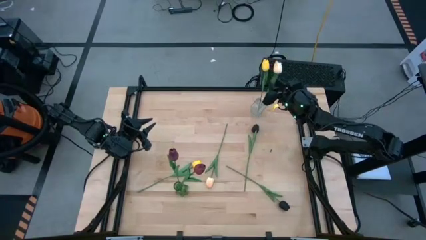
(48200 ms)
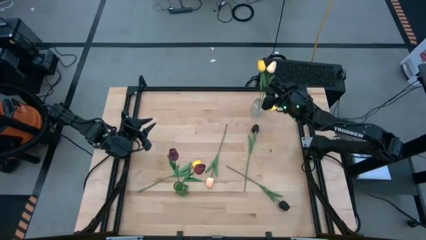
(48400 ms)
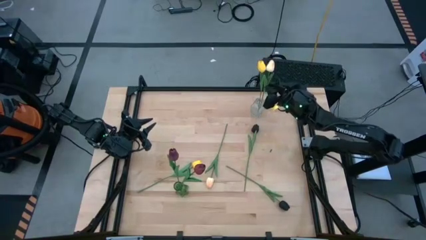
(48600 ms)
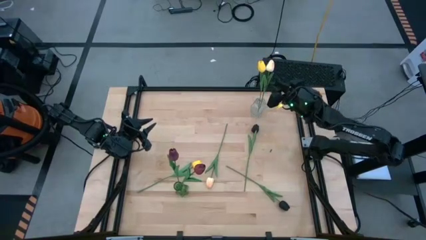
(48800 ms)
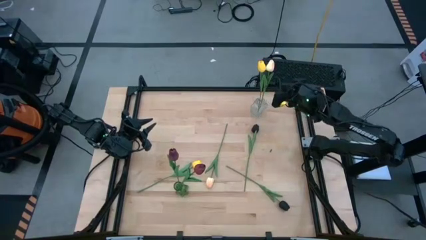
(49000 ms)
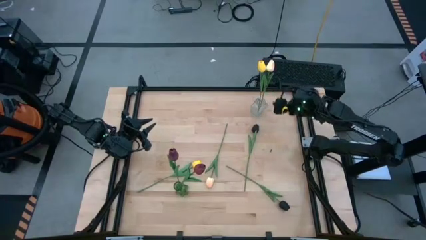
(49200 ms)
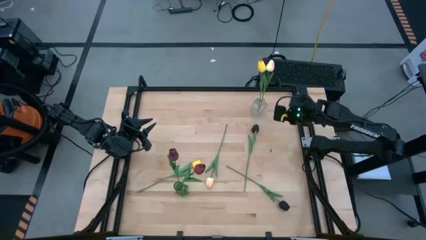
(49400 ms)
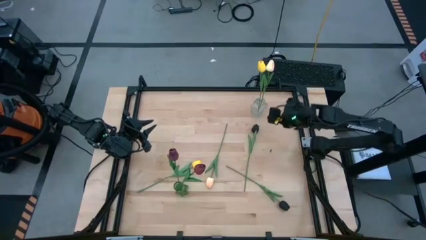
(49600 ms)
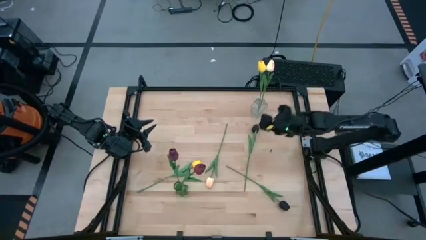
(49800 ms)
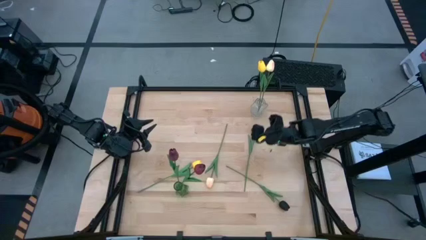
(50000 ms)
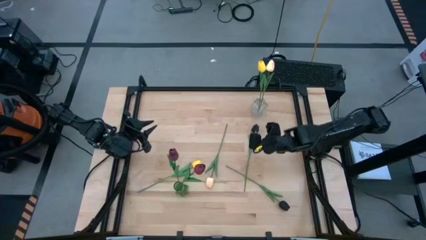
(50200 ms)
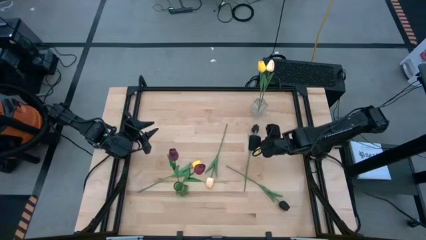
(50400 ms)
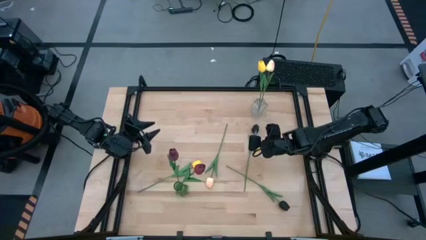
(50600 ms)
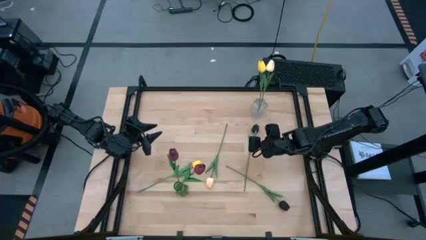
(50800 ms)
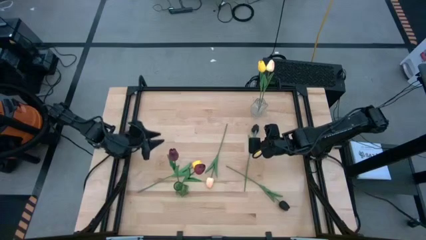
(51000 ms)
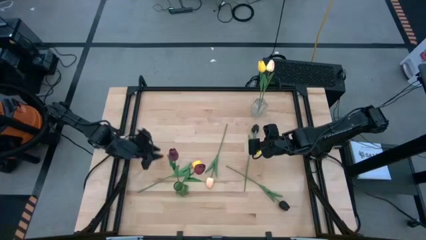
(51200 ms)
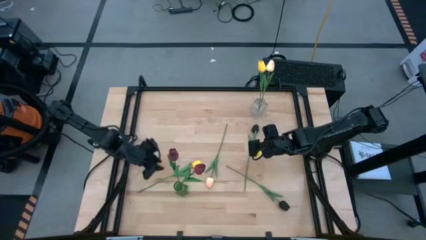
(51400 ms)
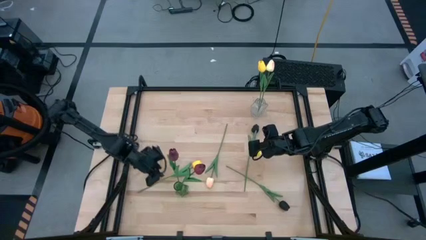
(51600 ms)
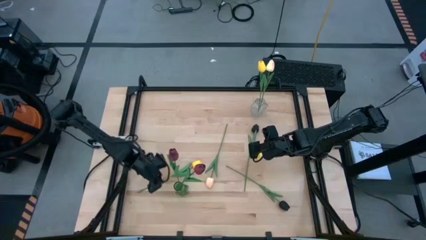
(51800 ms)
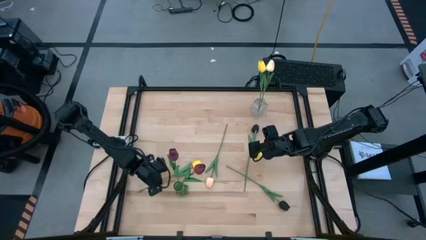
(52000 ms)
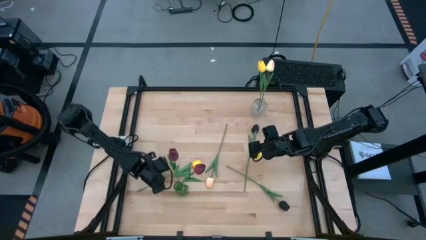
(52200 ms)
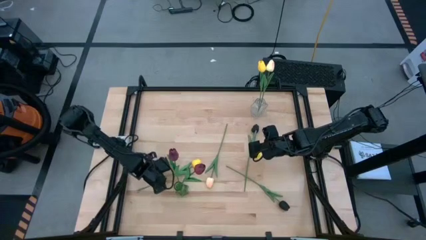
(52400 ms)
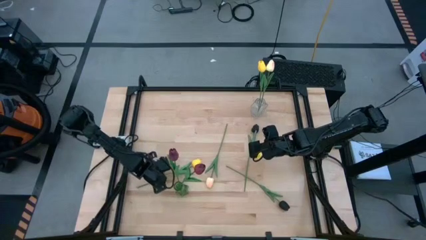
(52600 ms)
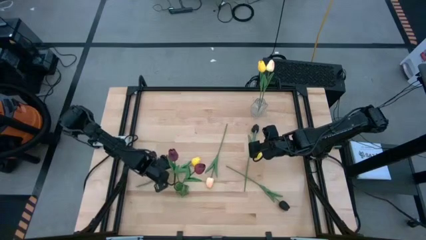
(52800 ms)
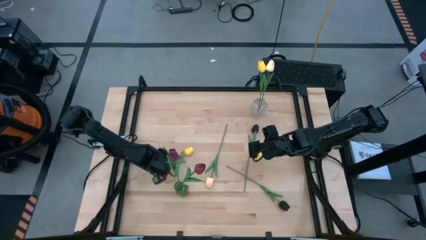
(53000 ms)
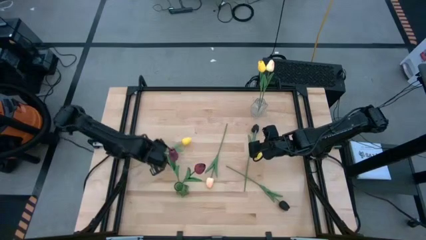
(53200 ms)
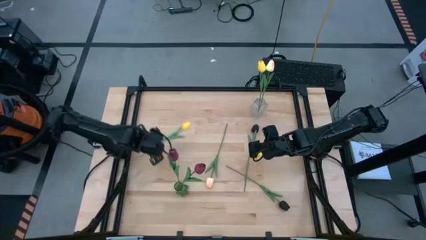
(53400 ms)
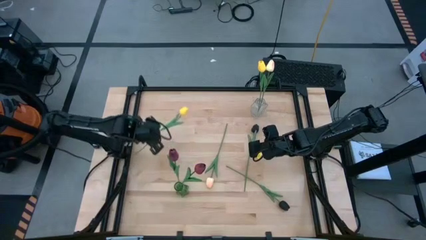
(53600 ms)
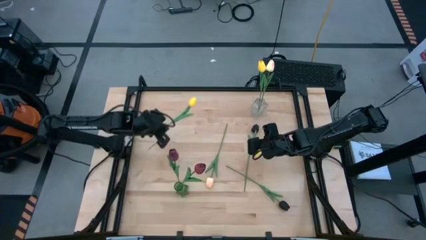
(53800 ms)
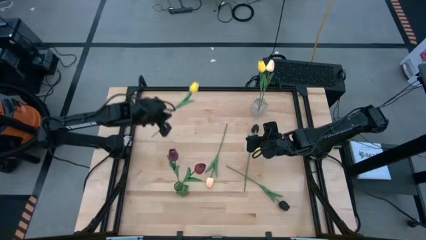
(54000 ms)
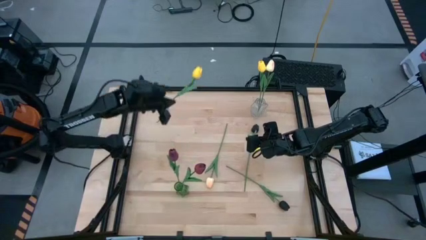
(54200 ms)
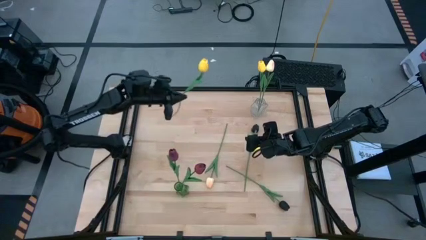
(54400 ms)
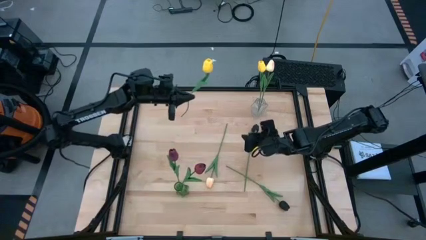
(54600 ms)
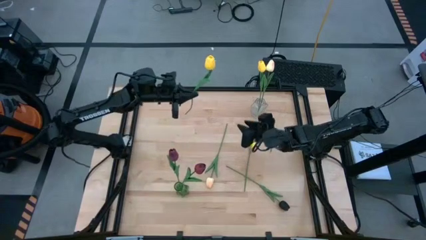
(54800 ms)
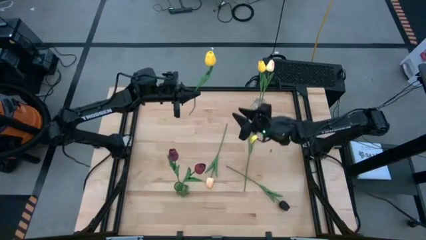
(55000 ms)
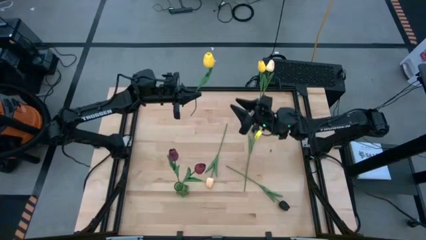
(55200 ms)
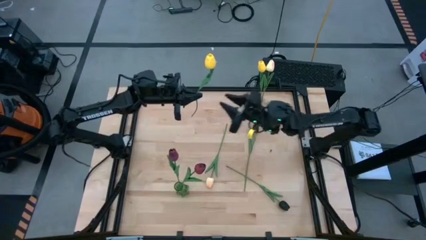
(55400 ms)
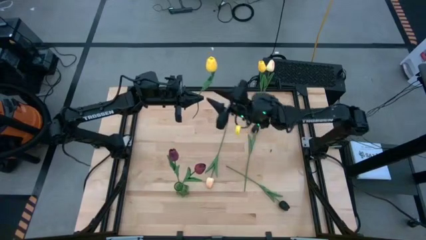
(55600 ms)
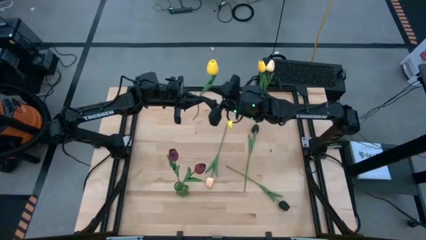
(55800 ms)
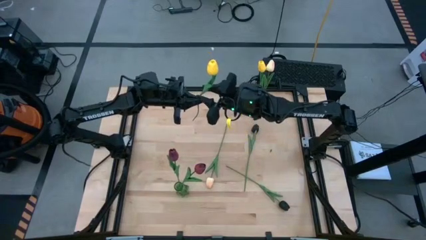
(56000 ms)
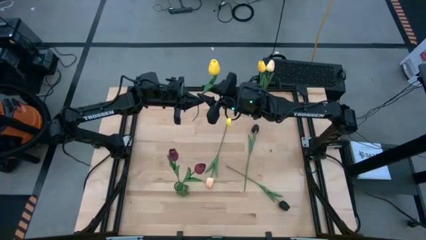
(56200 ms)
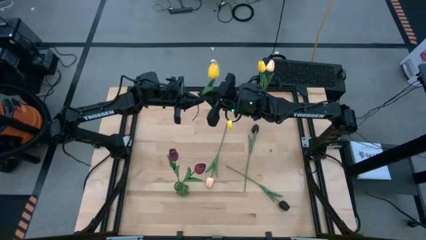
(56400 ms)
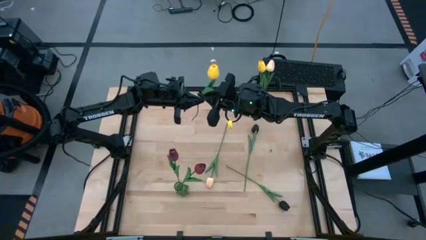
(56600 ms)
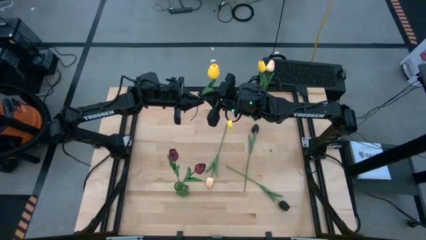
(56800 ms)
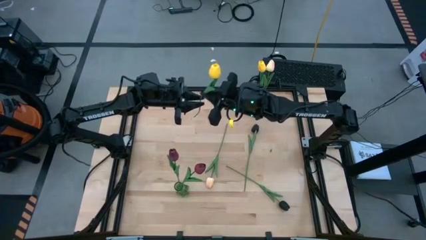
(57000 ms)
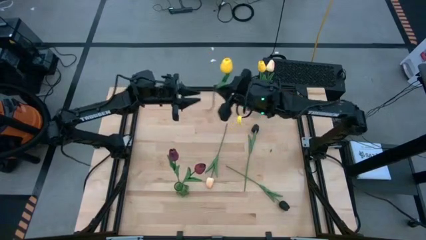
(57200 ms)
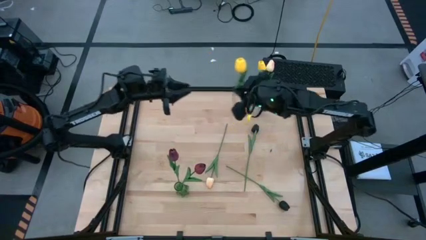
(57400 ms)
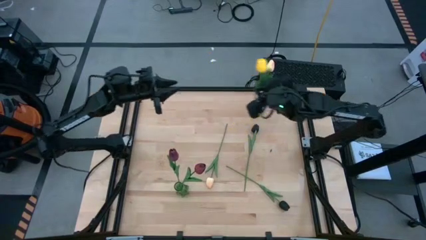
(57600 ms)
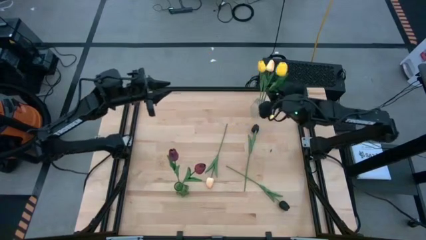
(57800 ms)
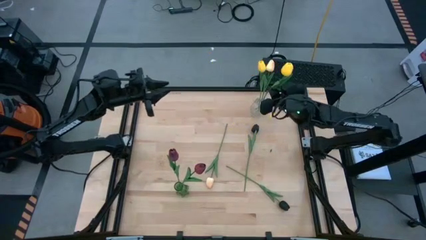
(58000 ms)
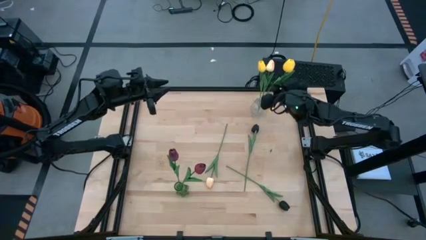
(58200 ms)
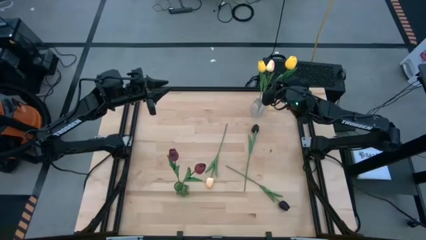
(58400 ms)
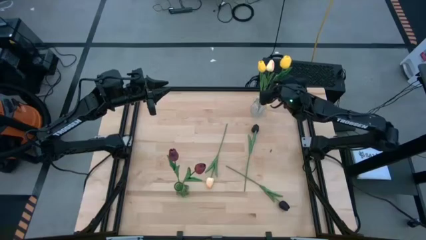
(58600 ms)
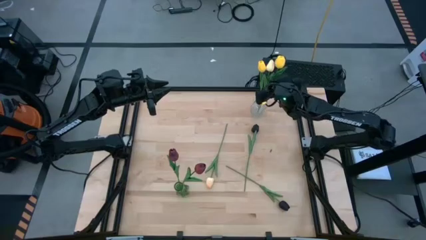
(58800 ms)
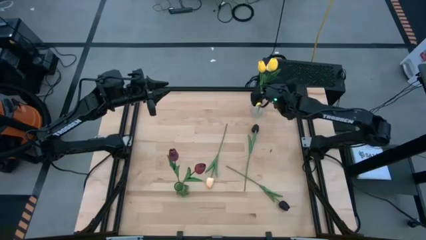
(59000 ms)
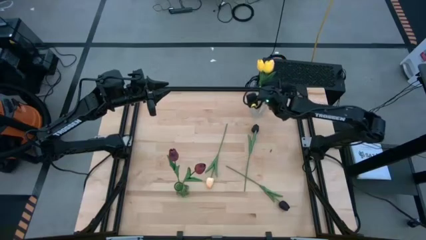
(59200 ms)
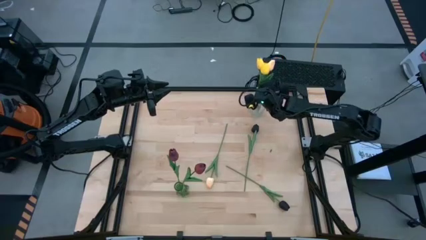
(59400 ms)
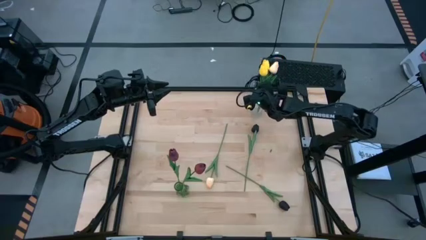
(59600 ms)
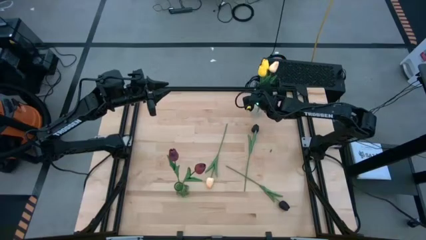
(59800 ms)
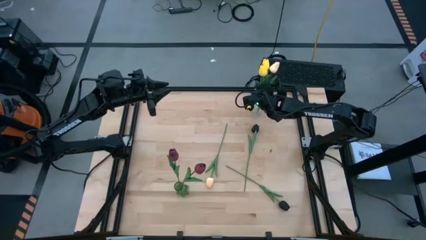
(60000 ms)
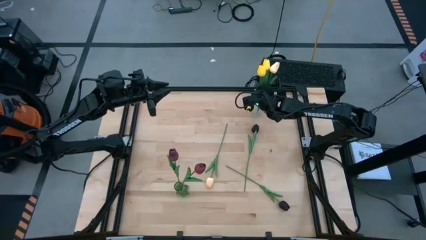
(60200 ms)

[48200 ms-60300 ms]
Task: Sort flowers into vase by color
Put the yellow flower into the vase
